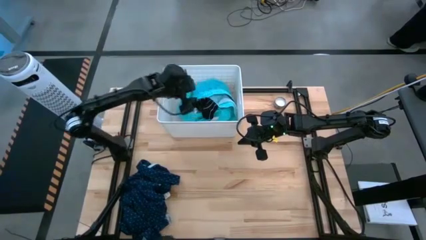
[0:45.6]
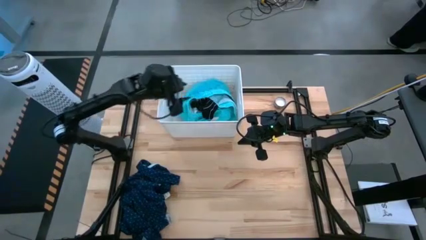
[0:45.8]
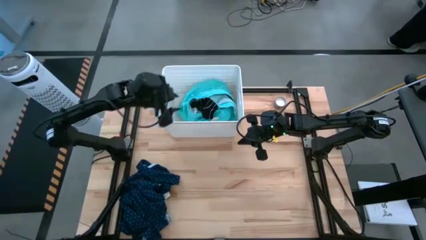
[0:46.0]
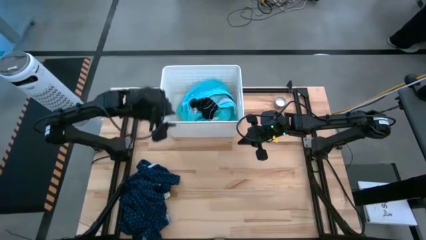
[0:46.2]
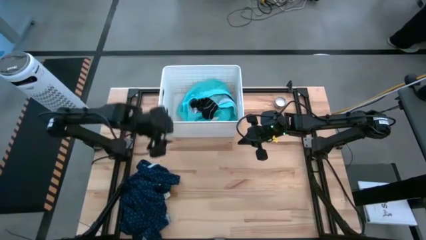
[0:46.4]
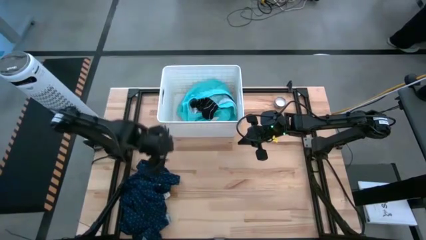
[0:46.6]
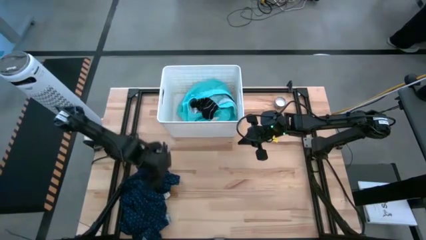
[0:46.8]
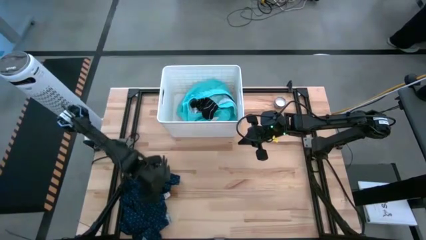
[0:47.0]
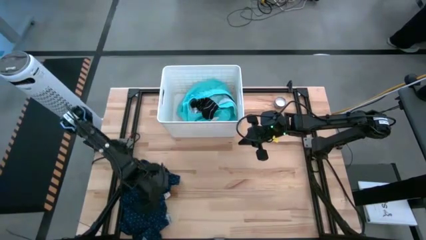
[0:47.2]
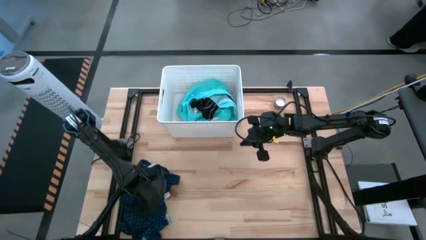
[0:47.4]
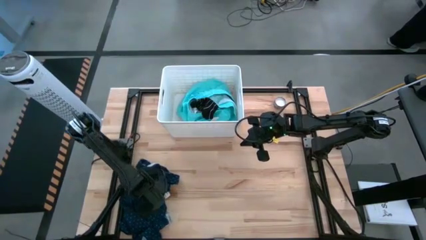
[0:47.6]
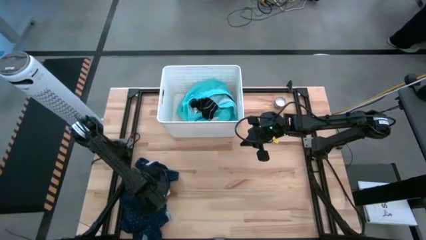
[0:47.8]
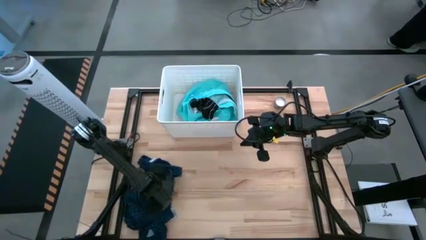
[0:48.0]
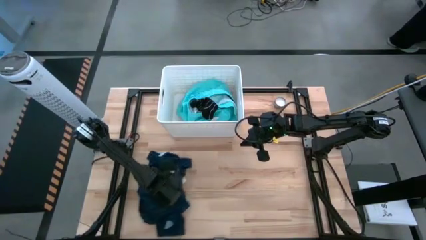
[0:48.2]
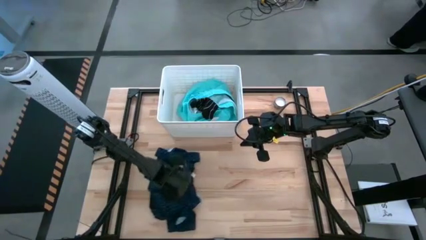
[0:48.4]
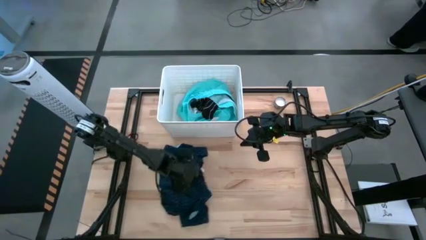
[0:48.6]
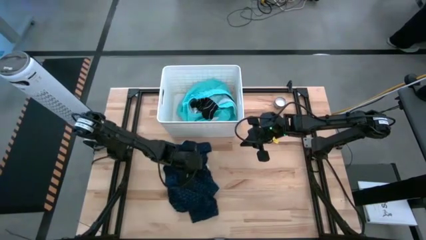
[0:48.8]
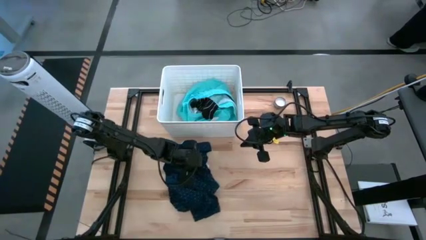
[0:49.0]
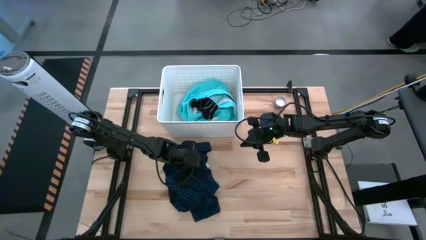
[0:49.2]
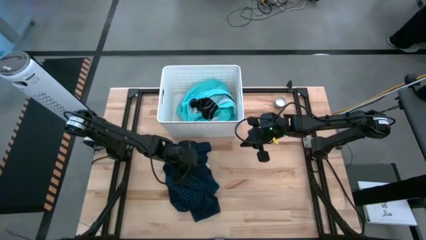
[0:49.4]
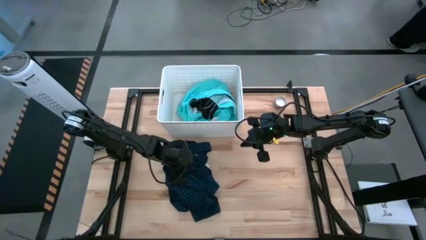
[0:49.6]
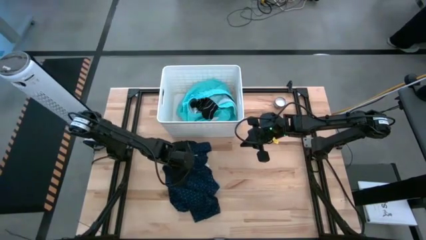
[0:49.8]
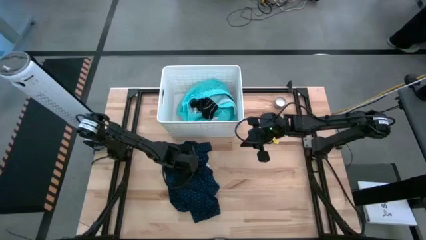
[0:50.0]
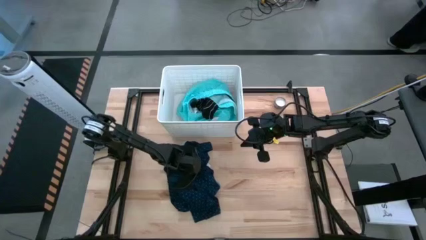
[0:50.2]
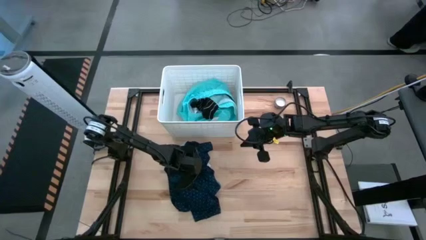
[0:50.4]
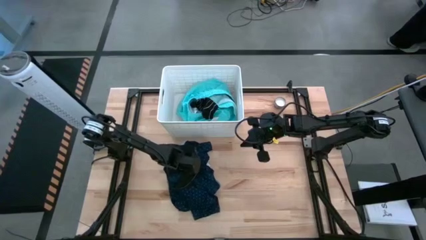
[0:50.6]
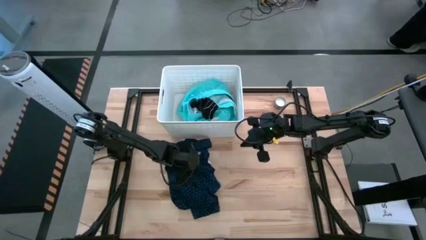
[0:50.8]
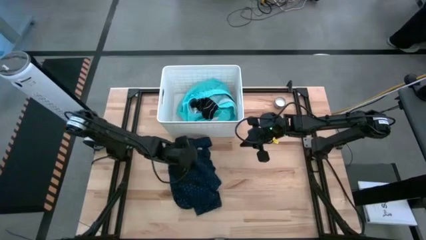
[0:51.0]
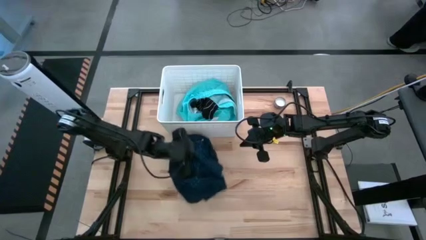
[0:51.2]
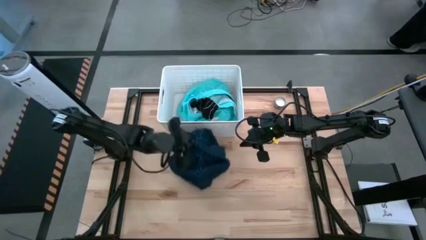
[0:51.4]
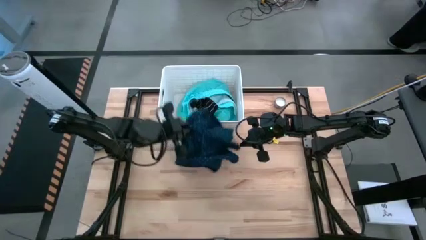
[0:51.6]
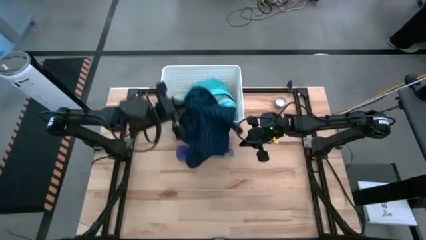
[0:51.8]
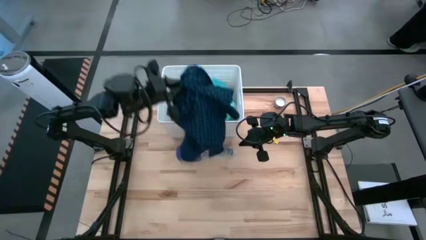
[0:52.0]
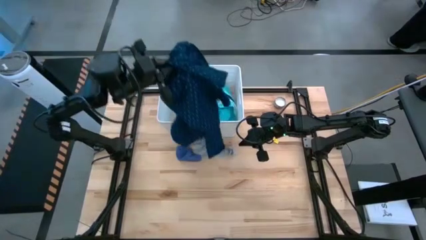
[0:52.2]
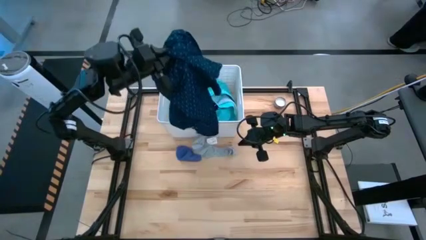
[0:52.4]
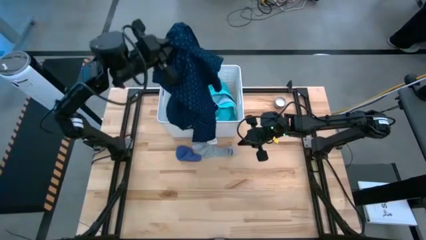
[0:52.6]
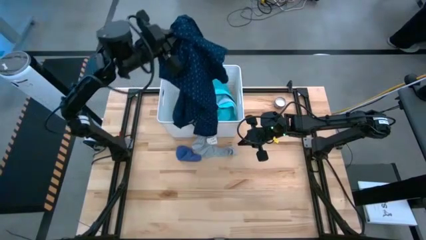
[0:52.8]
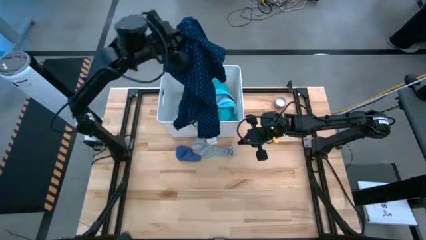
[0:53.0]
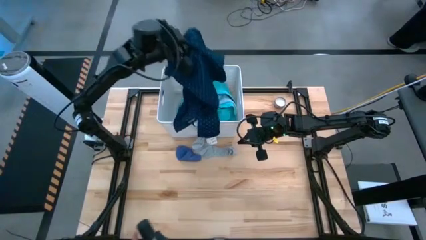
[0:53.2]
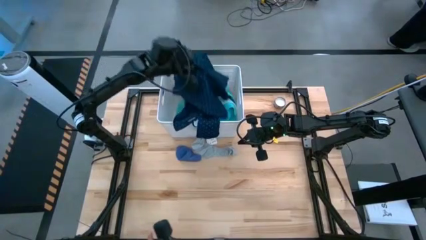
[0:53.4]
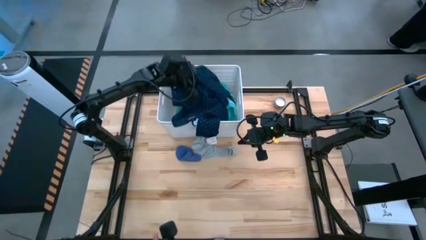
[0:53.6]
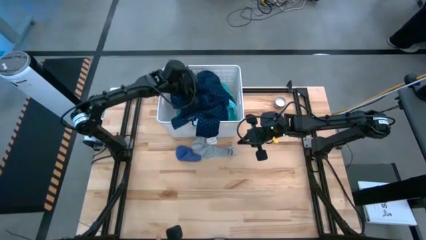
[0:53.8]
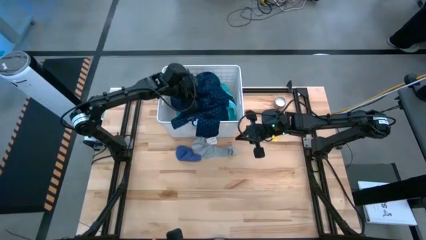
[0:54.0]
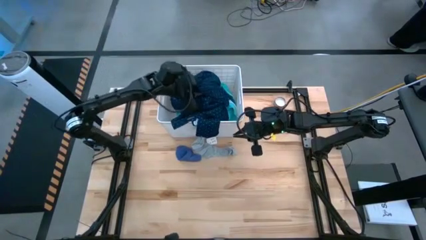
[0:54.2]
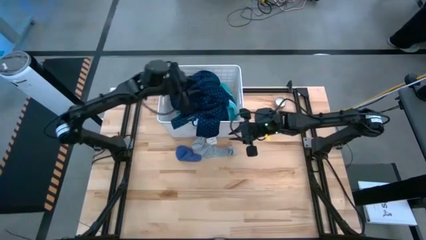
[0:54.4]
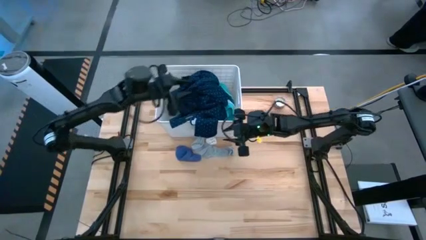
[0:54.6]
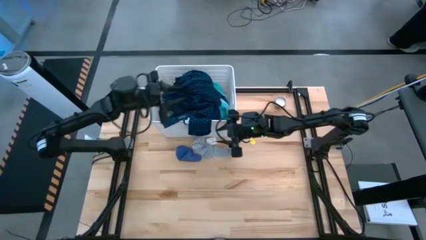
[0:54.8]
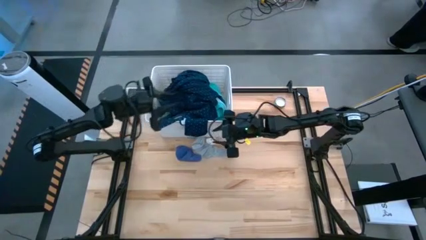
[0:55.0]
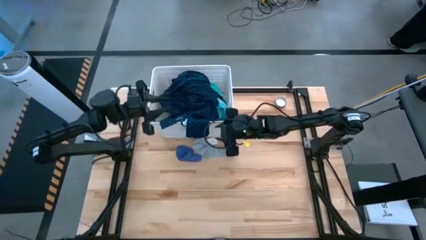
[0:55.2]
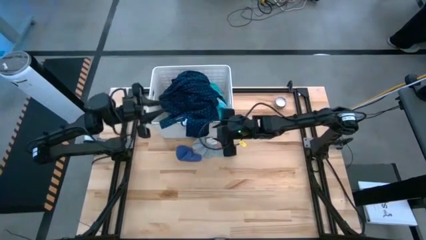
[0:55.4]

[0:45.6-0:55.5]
Task: Sort clothes
Put the dark blue polo shirt into the white laundry bin

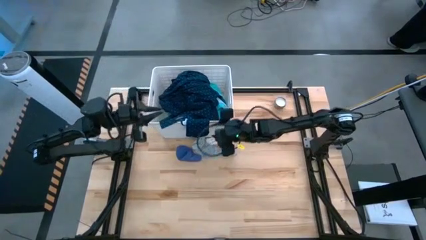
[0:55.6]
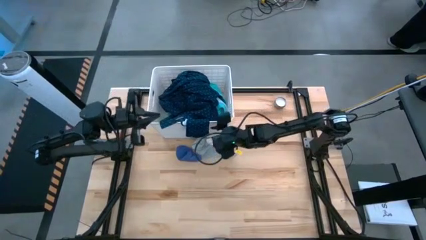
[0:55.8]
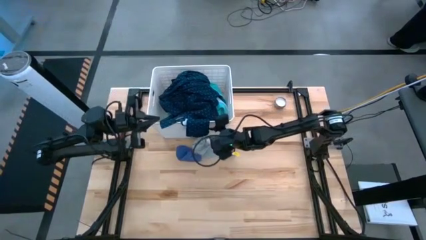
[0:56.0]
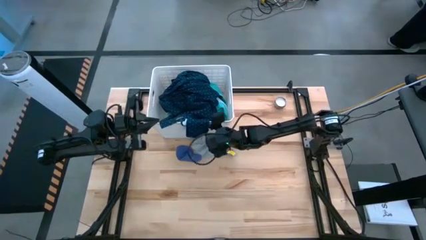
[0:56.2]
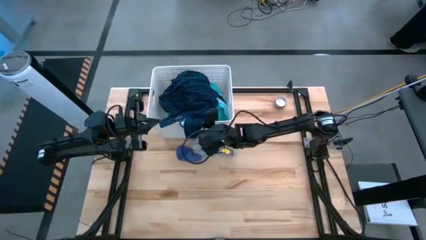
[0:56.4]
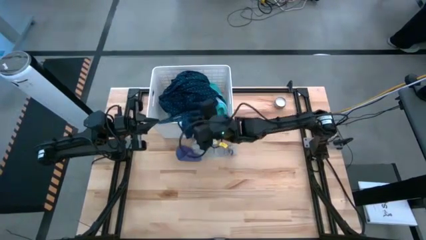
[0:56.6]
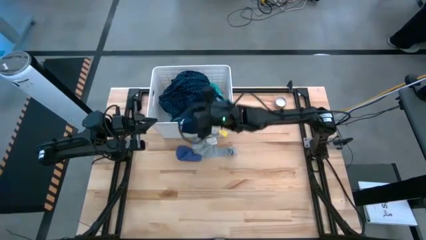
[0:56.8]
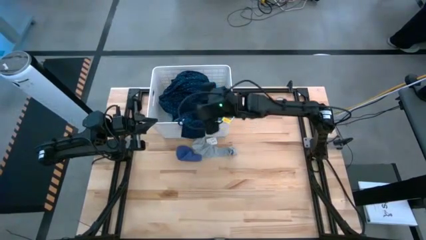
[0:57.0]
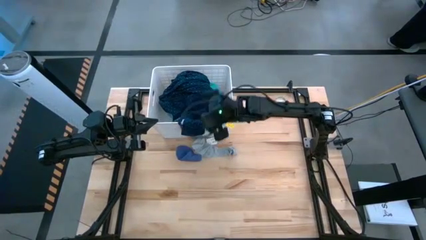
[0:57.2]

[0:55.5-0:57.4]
Put the dark blue polo shirt into the white laundry bin

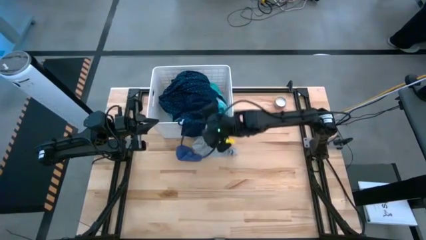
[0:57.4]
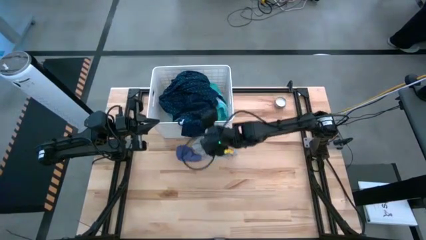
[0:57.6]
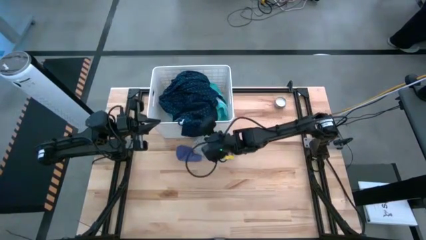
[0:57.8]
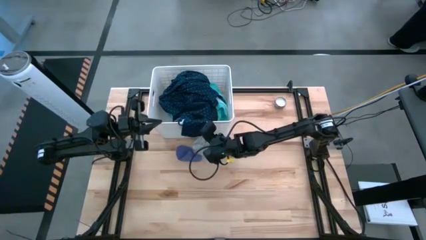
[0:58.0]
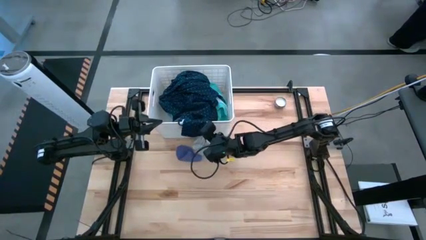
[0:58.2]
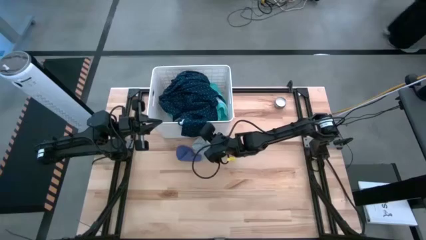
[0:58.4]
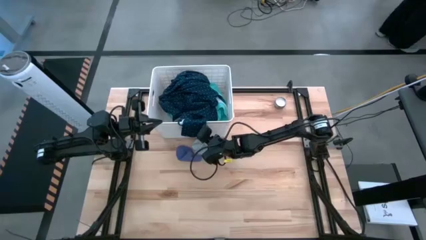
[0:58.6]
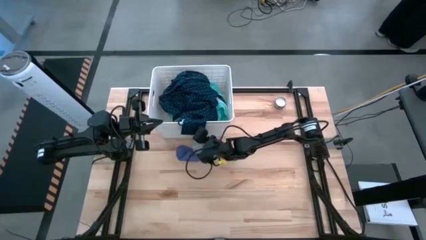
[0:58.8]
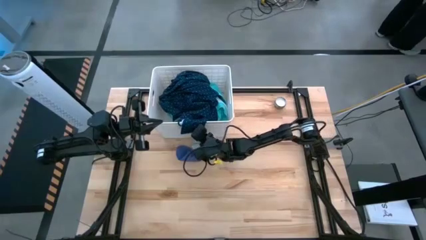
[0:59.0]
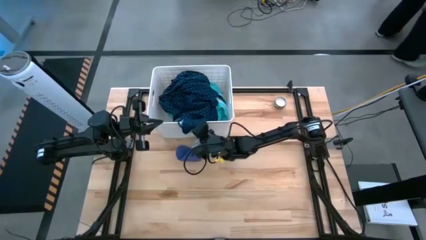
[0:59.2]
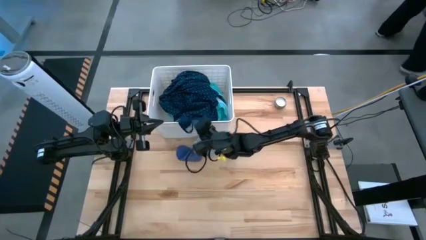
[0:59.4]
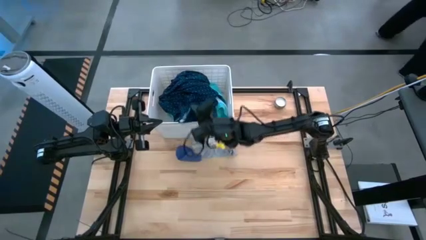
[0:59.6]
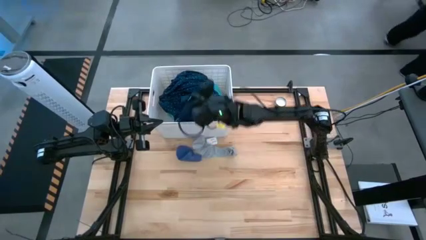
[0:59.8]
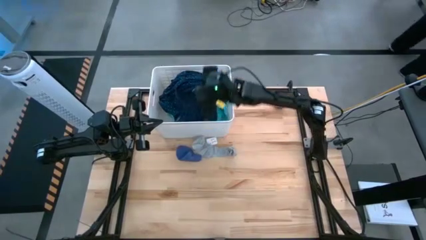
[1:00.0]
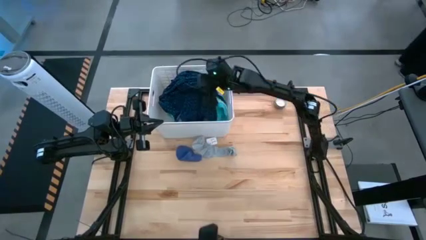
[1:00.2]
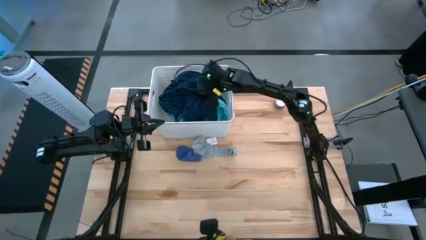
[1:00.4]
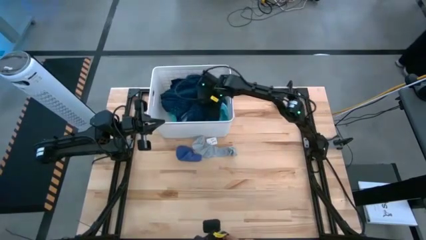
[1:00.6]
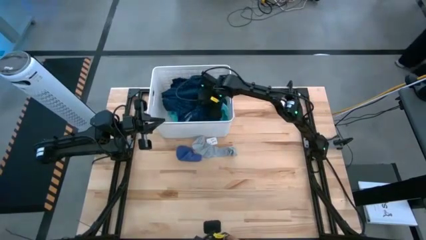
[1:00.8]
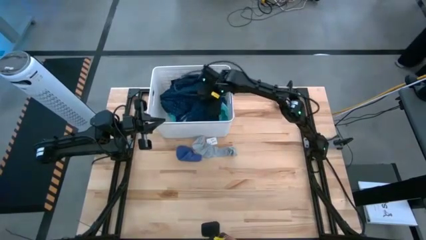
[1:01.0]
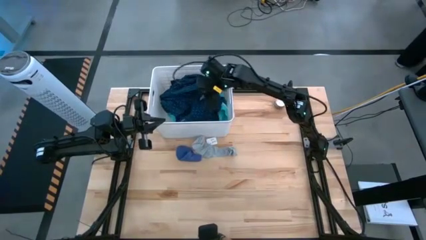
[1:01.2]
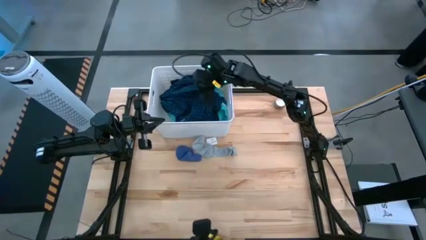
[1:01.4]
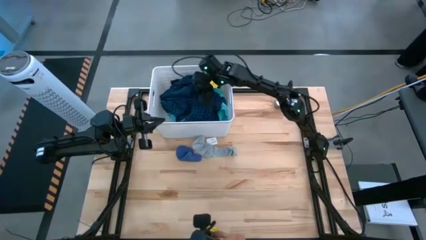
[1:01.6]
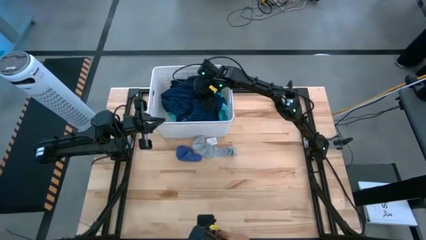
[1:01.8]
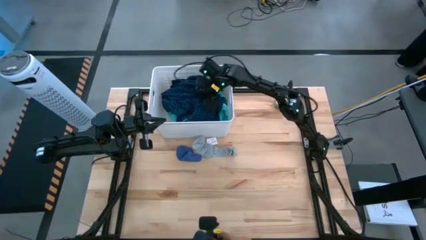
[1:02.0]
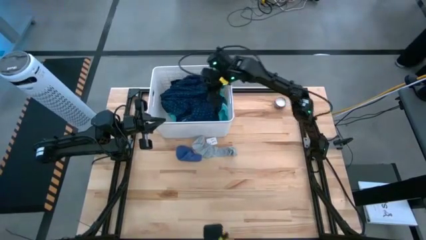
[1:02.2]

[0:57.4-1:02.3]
Put the dark blue polo shirt into the white laundry bin
